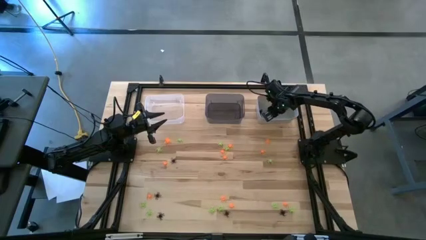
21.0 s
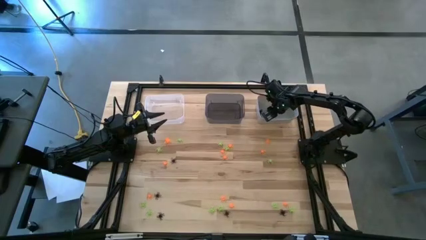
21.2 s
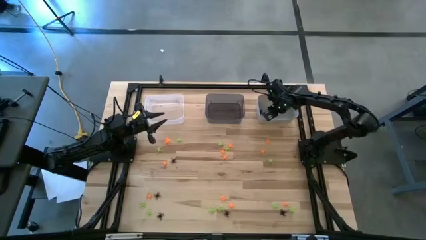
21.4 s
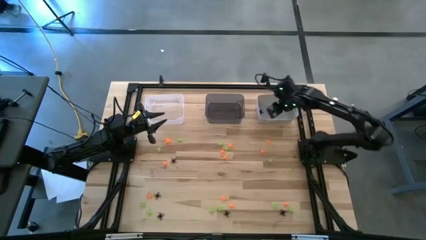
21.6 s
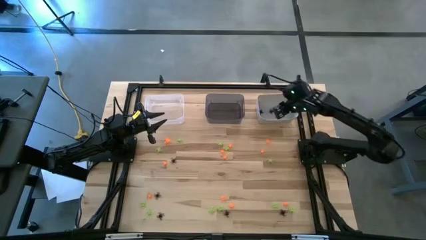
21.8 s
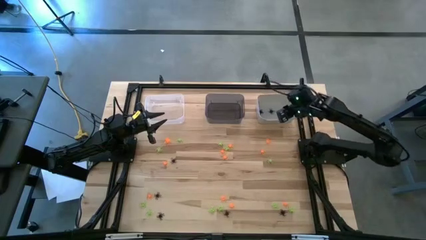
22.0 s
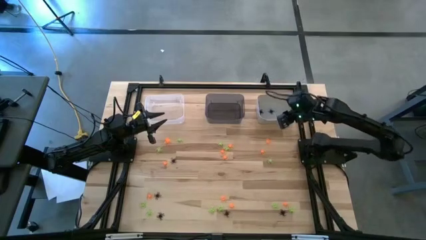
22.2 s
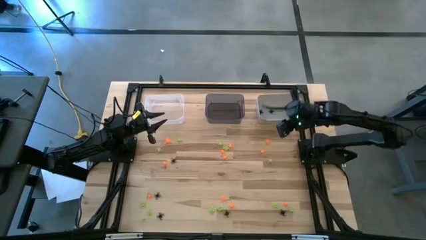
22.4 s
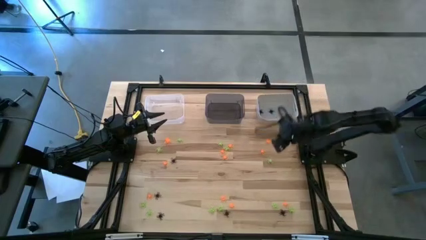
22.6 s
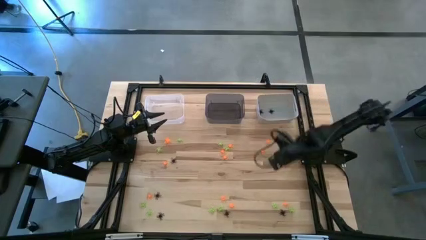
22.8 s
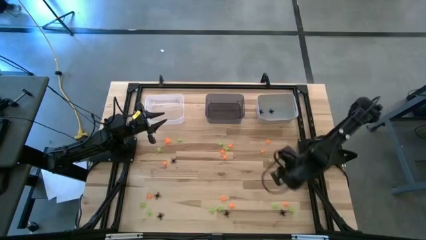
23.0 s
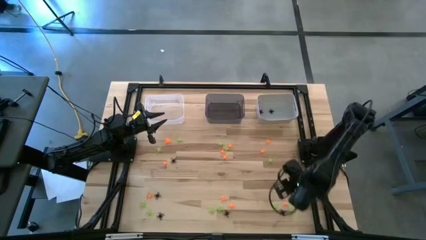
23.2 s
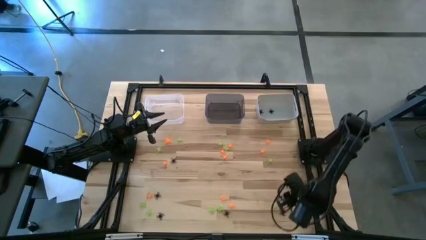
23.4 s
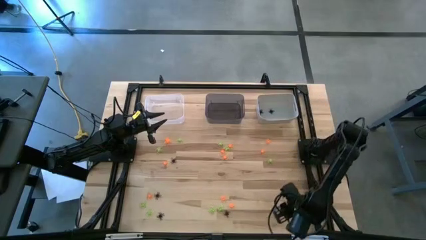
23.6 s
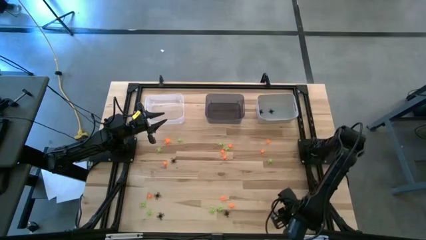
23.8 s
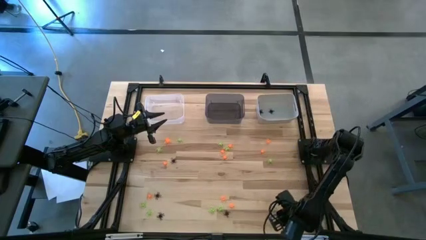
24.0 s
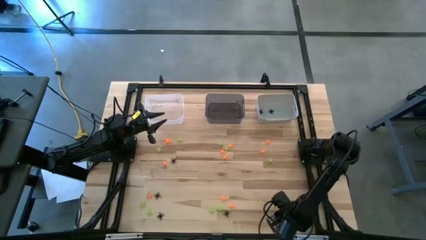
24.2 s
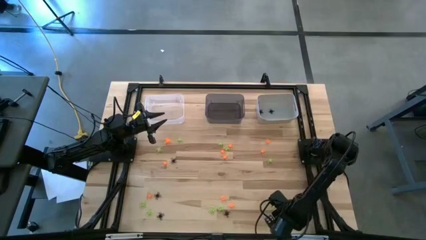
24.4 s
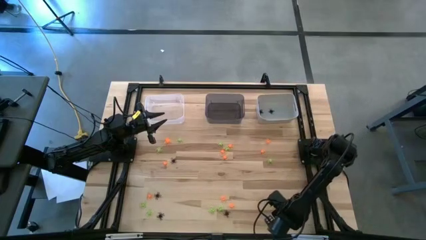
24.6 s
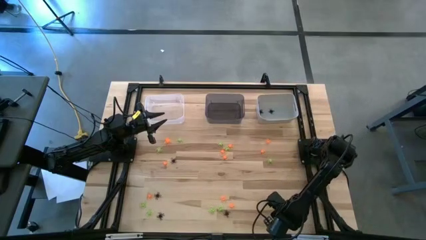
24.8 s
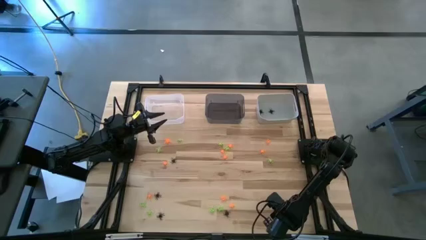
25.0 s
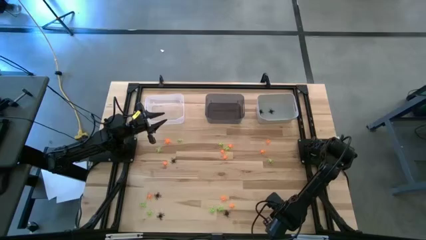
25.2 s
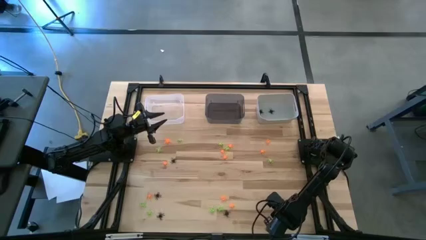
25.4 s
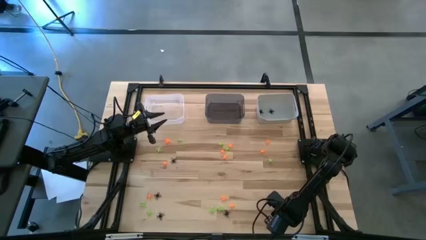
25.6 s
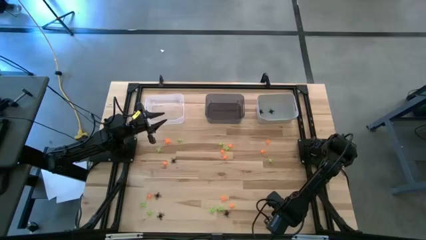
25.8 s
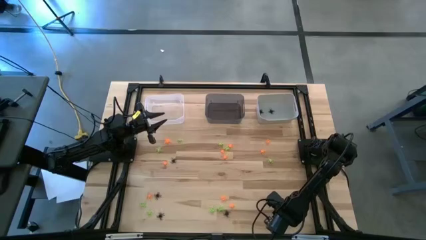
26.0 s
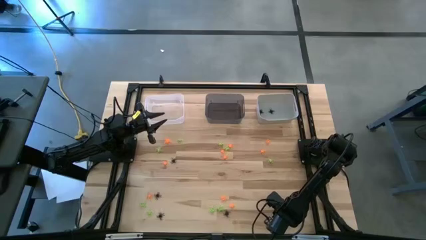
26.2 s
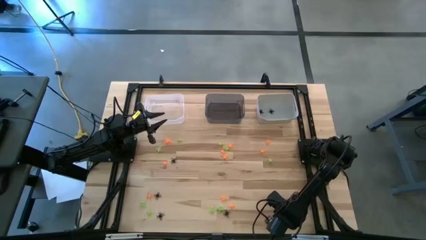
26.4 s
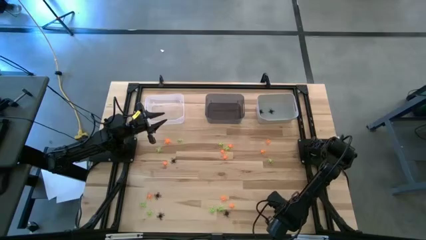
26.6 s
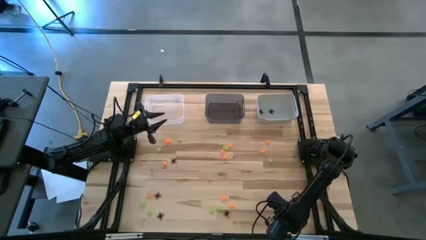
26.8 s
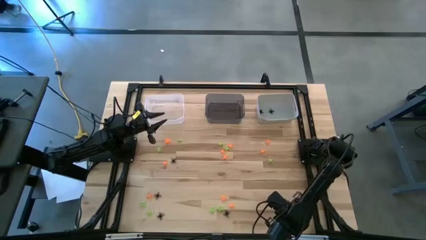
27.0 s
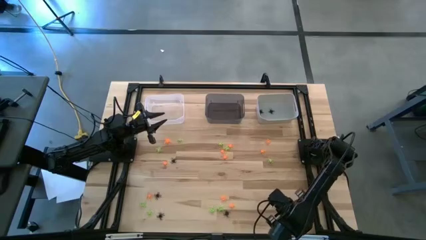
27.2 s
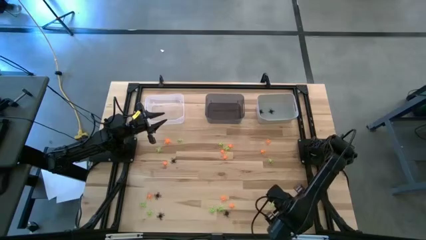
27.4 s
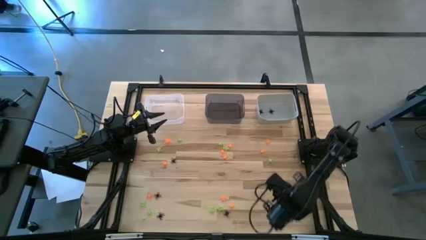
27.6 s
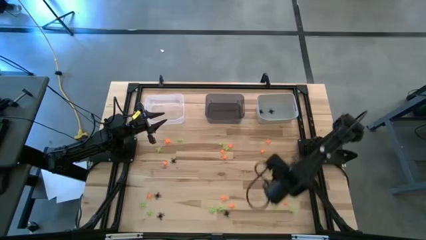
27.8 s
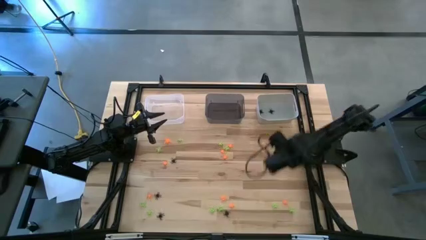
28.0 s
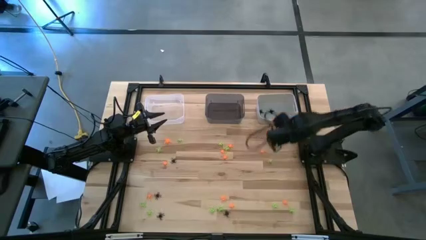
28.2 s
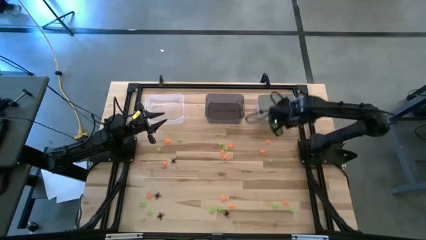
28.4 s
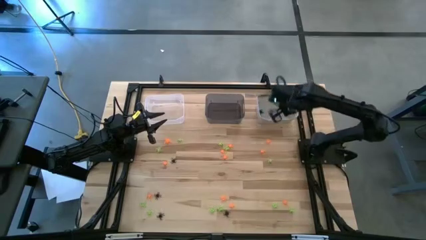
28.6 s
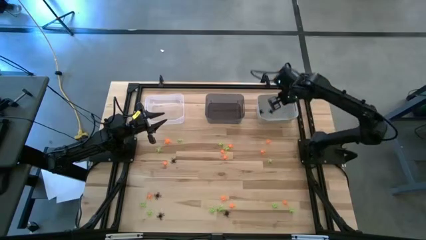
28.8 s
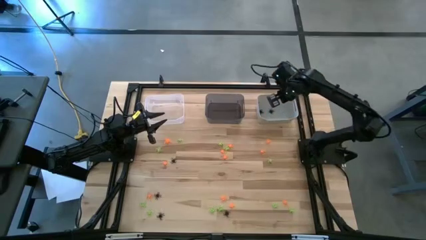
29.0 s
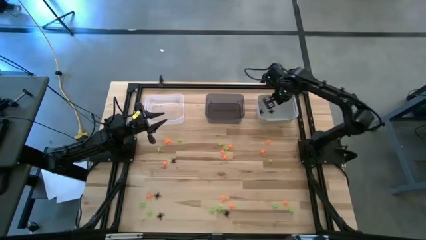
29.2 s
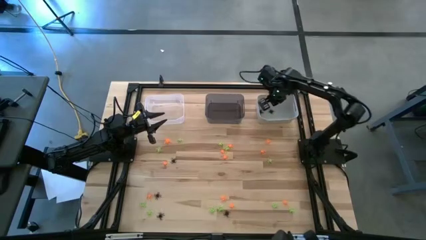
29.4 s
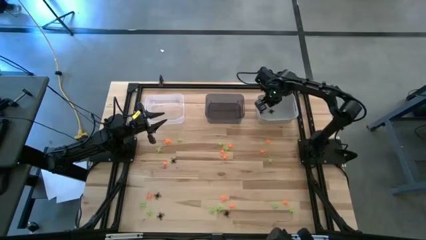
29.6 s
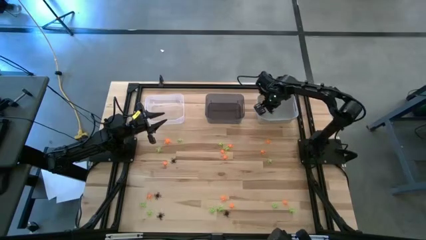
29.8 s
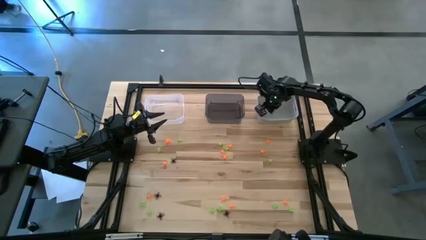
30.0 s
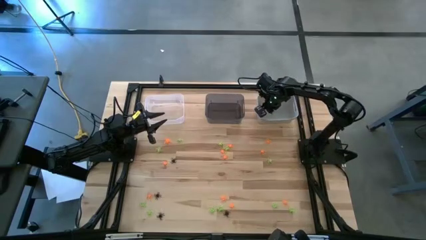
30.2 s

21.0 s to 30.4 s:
Task: Sort Halloween decoration
Put the black spider toy into the white bin

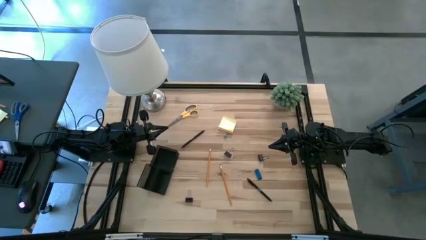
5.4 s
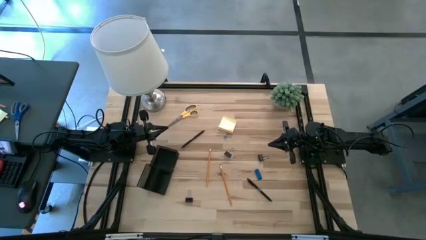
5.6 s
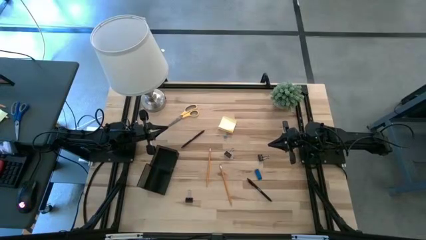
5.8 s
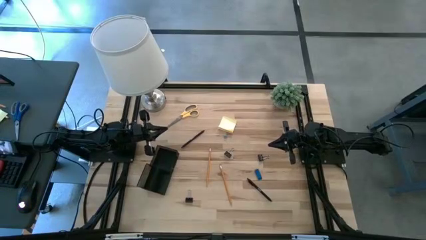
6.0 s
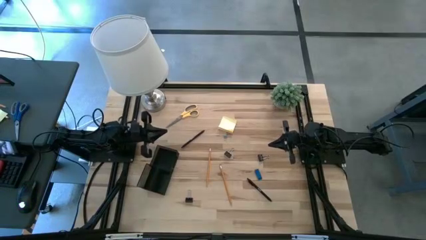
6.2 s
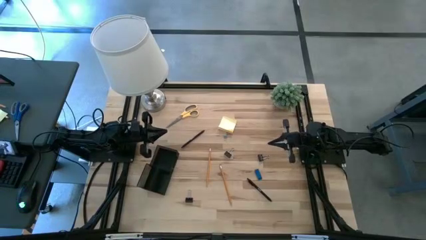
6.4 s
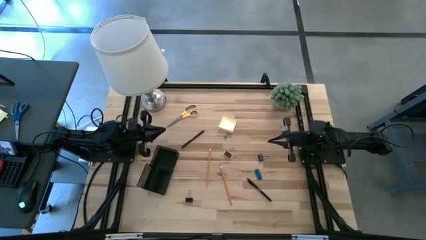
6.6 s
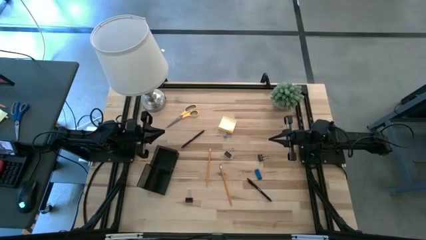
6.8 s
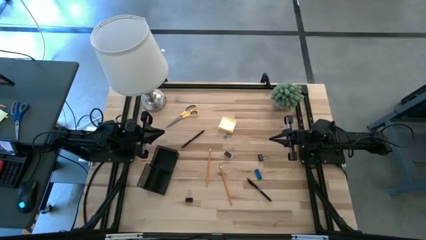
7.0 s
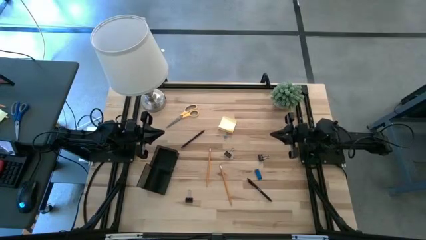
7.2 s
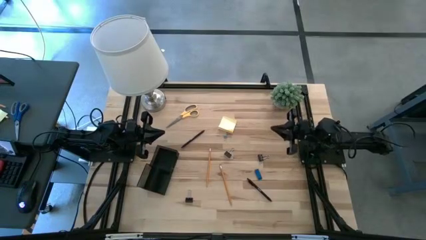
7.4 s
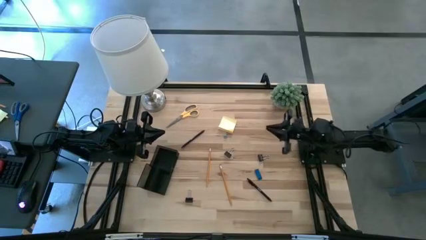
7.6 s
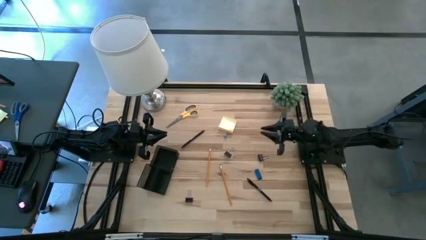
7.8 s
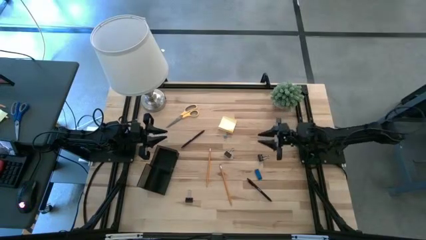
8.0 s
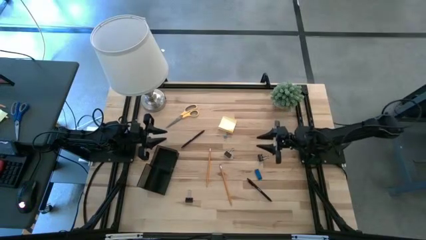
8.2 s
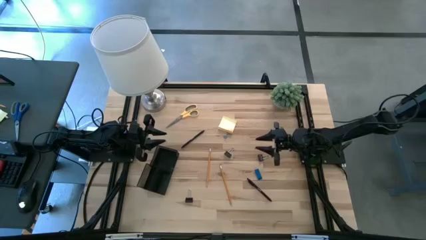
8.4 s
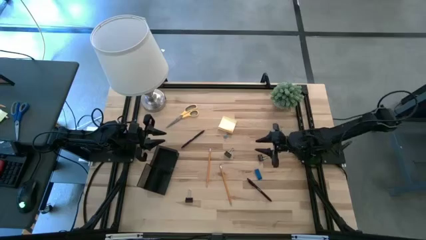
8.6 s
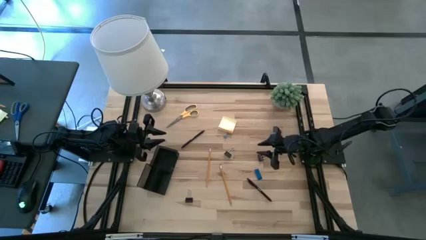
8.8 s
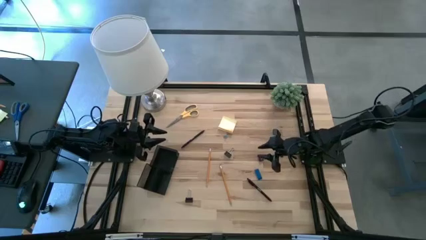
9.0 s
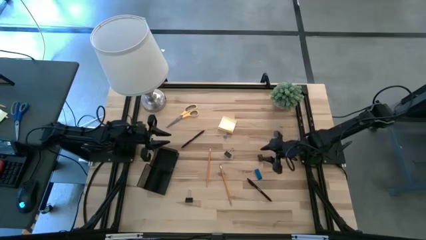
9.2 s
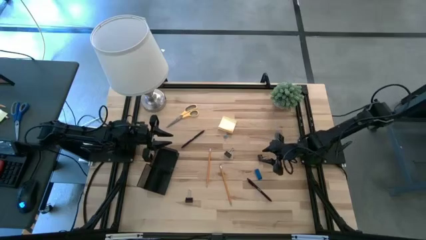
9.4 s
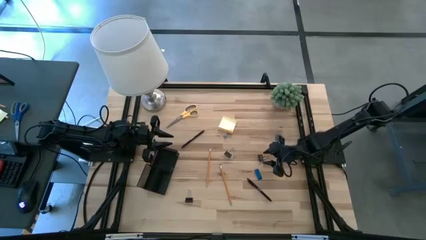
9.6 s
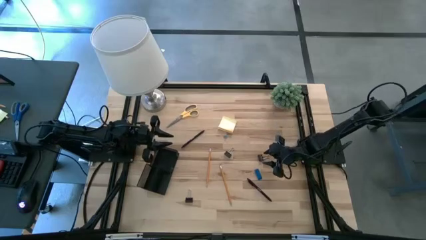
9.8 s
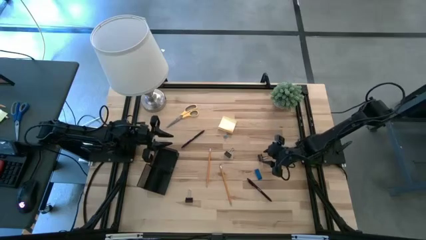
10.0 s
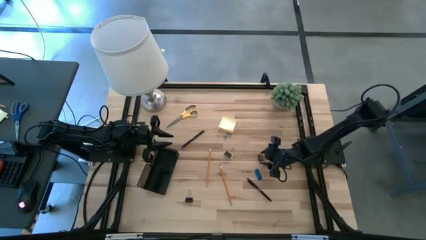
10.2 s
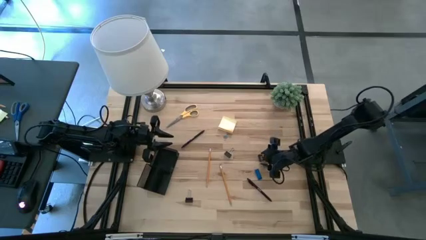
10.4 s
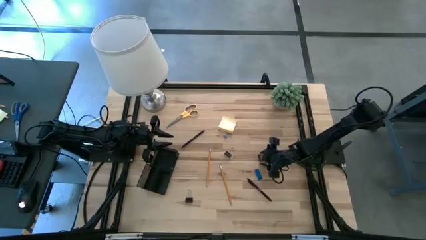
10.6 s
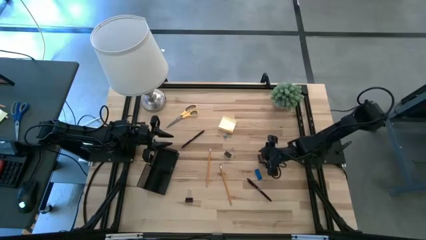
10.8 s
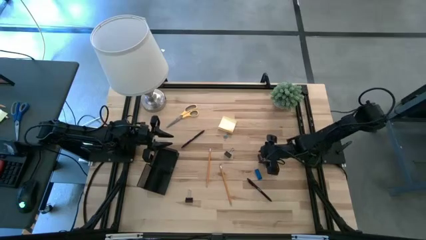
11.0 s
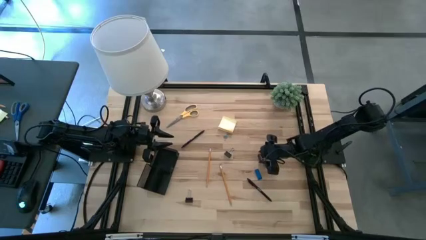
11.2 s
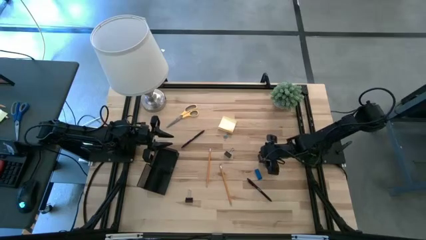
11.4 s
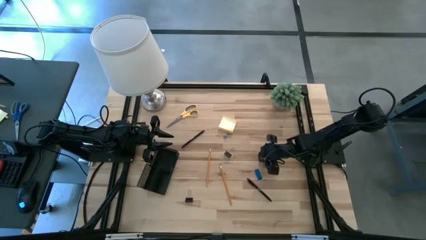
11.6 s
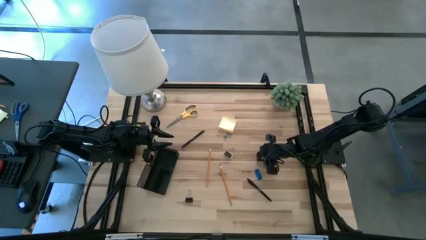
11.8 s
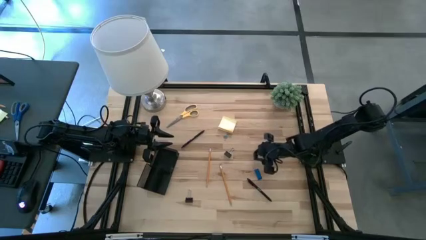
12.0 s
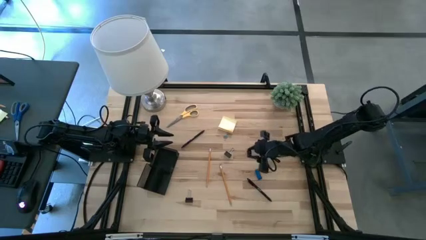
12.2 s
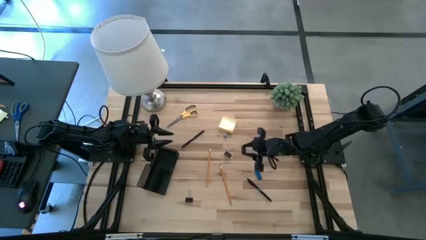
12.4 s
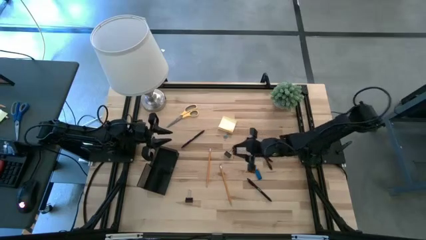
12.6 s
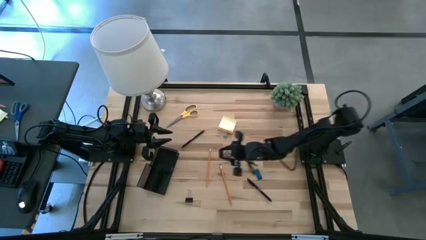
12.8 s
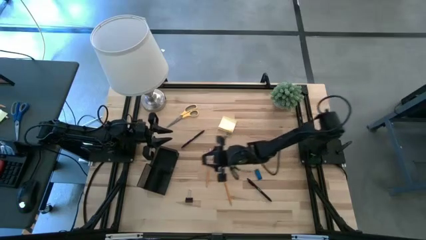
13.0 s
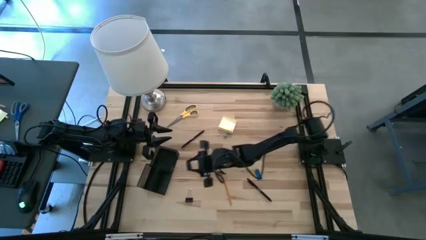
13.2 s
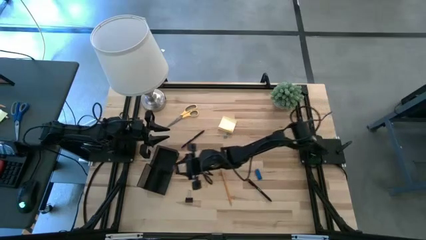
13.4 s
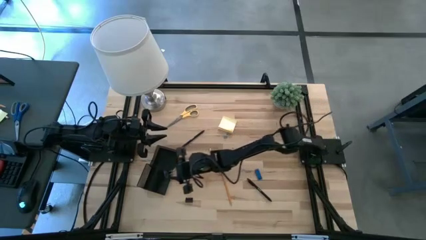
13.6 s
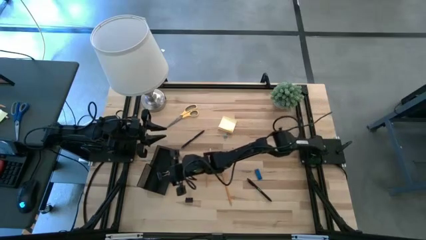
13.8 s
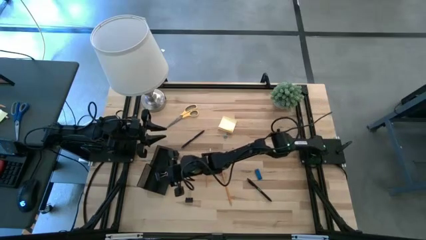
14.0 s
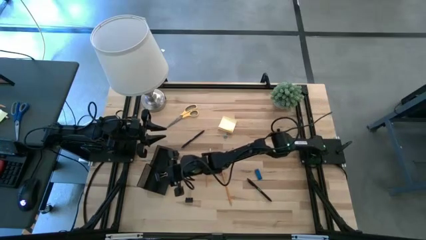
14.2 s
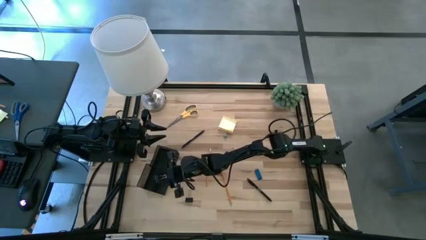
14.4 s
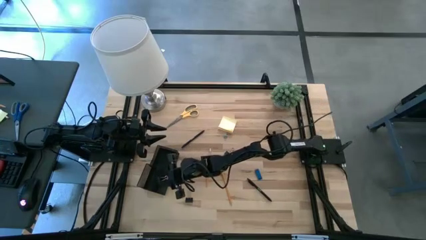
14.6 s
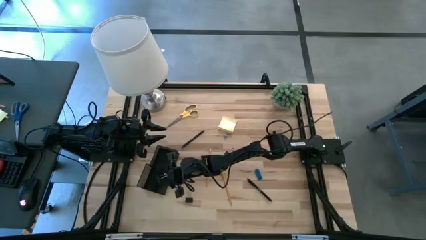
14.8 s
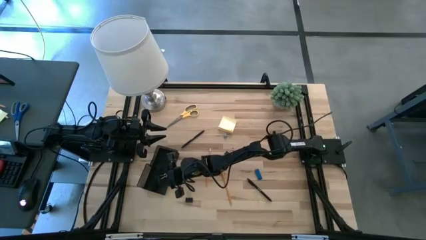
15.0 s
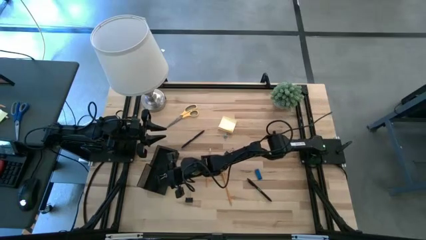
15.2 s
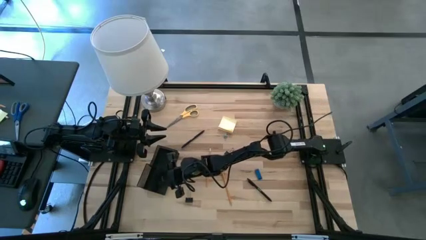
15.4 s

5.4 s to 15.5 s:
Task: Pick and place office supplies into organizer
Put the top right black binder clip into the black desk organizer
